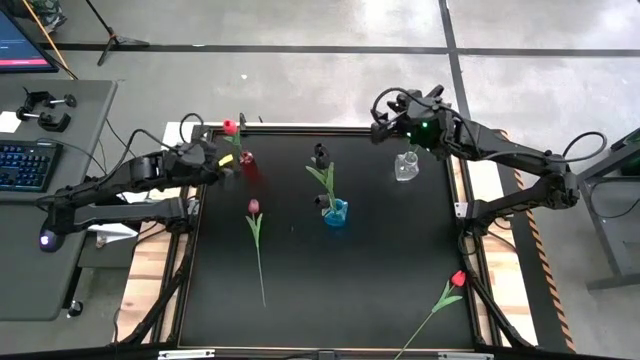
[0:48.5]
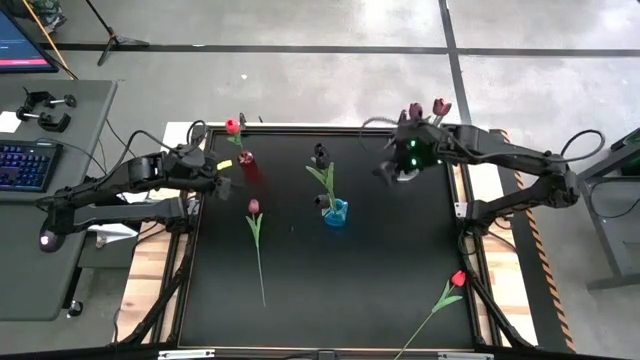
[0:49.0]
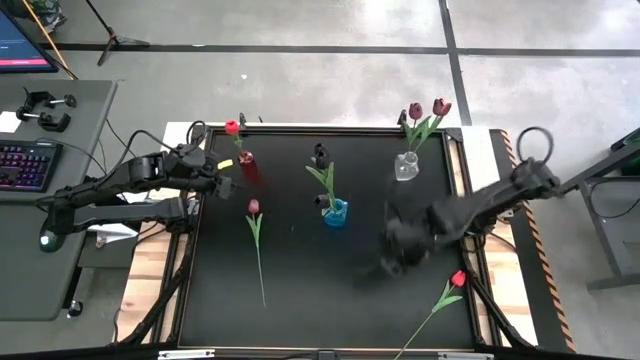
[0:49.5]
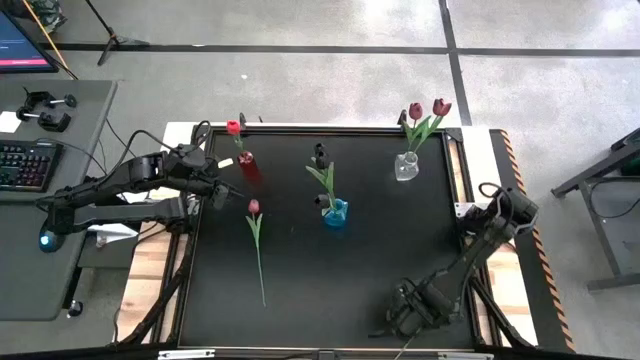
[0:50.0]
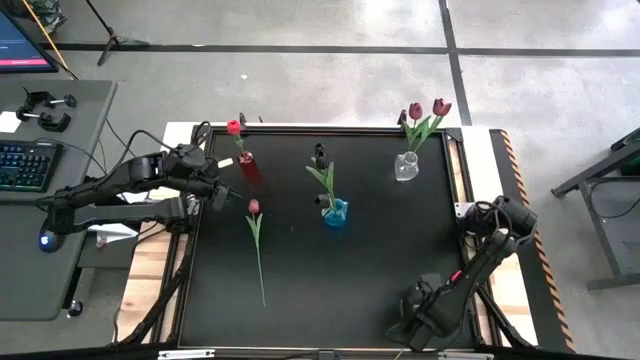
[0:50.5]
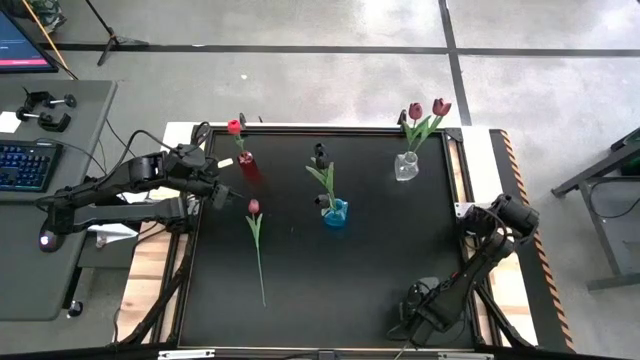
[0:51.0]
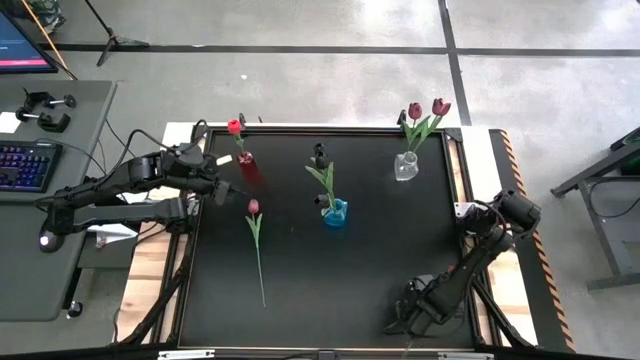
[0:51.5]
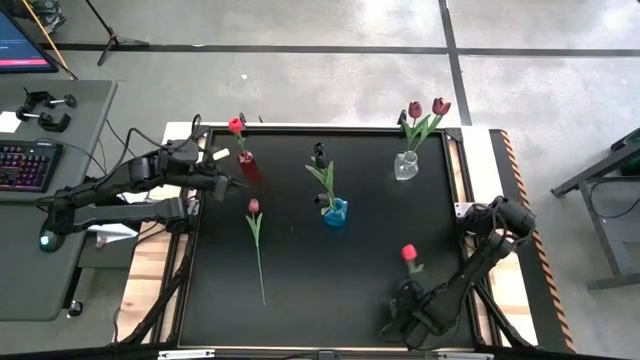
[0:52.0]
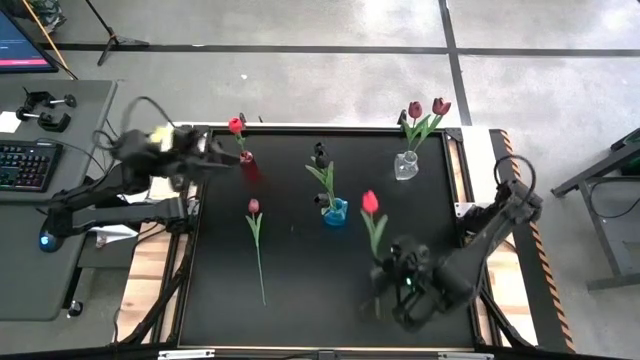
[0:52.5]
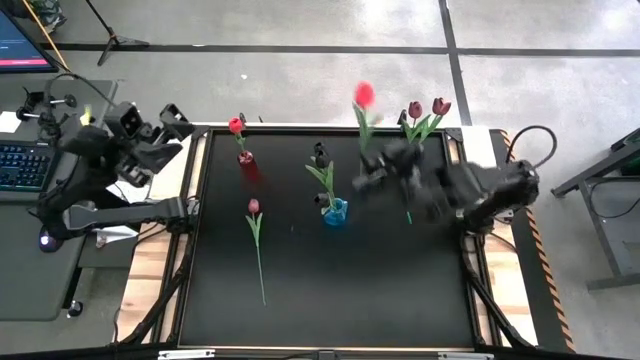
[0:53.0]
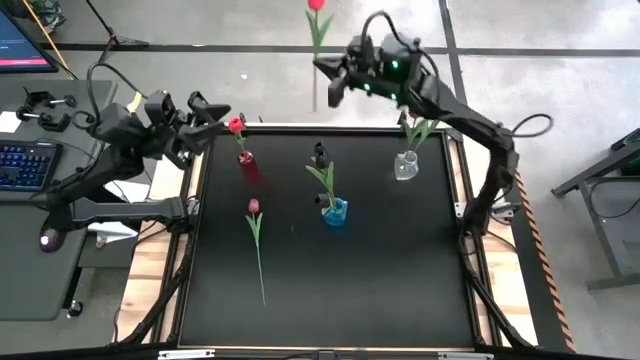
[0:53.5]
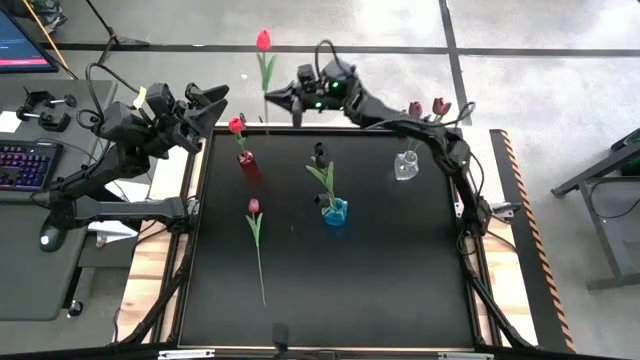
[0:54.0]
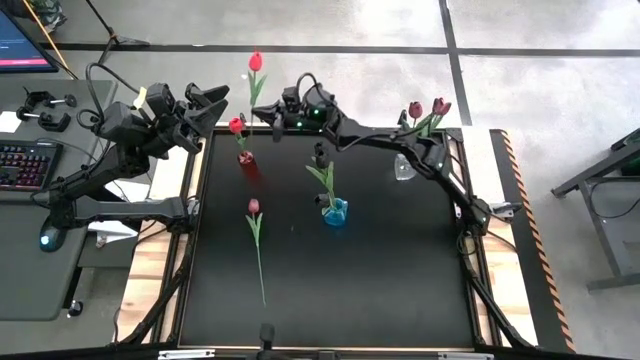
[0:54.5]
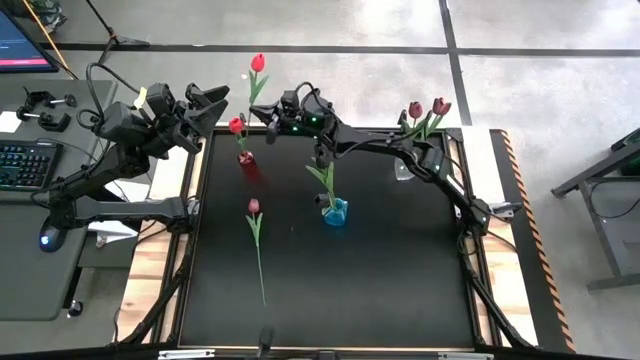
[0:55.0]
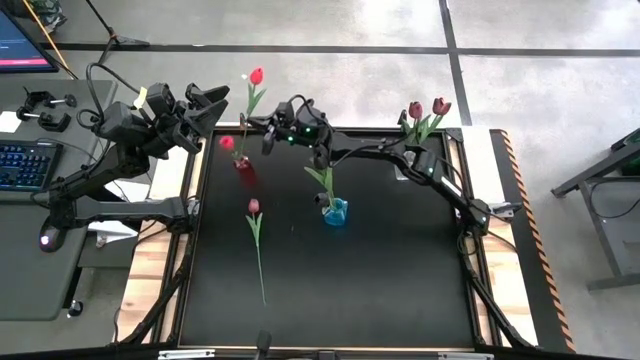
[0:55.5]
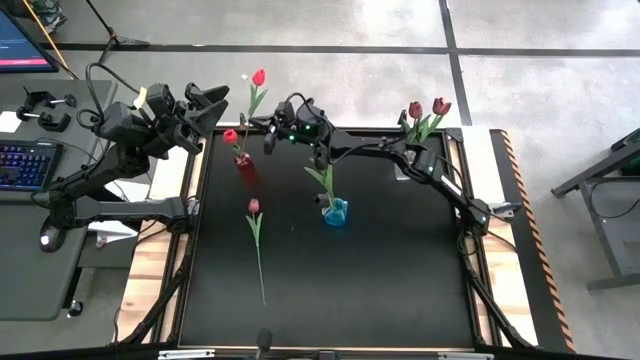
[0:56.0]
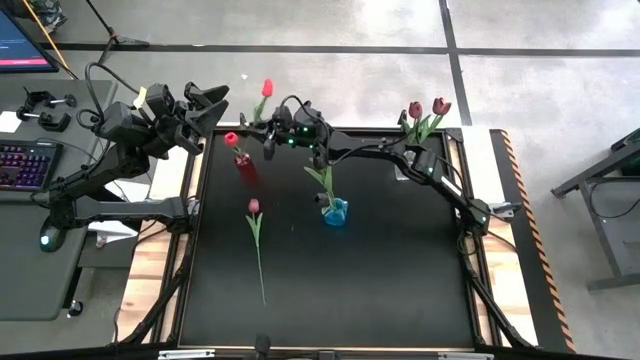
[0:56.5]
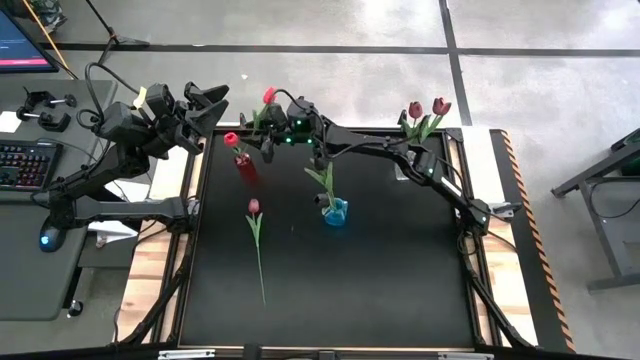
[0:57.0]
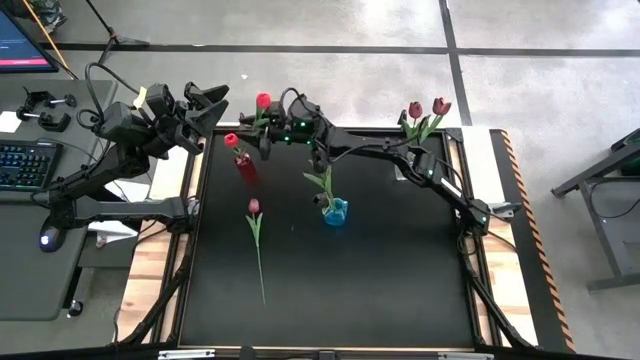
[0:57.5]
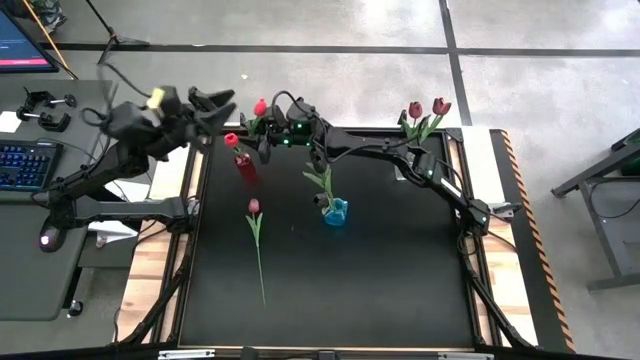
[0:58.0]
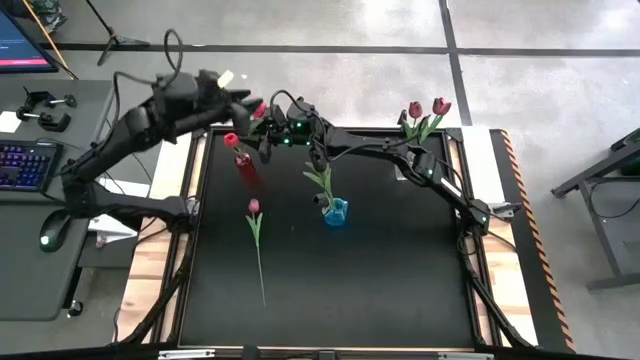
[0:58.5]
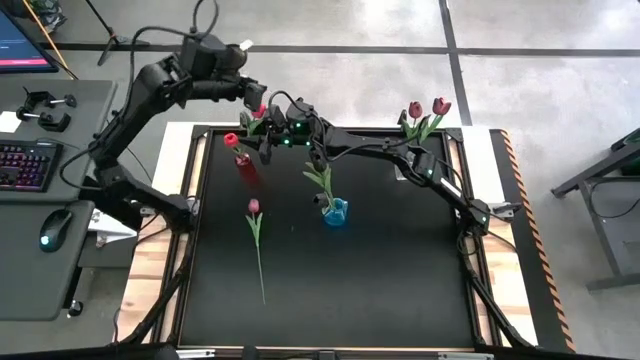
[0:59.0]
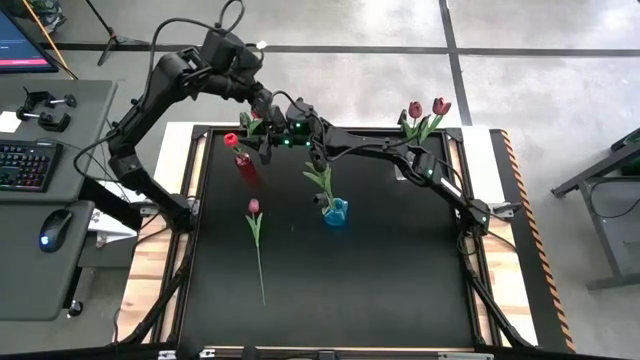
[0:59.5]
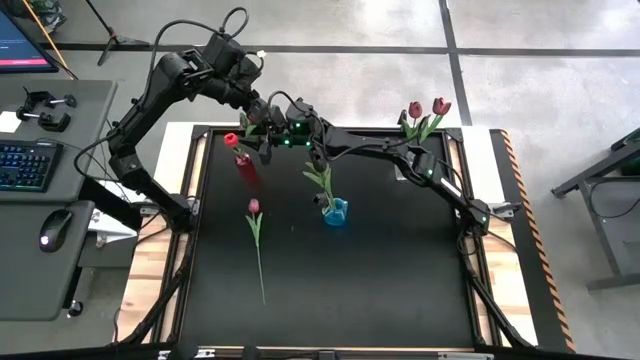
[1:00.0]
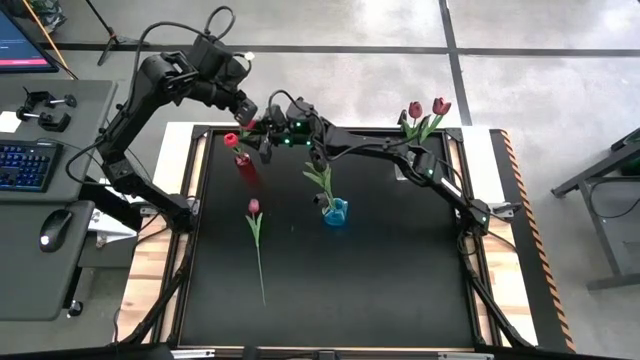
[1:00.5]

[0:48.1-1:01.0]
Task: Sort flowers into vase by color
Put the pink tulip into the red flower vase

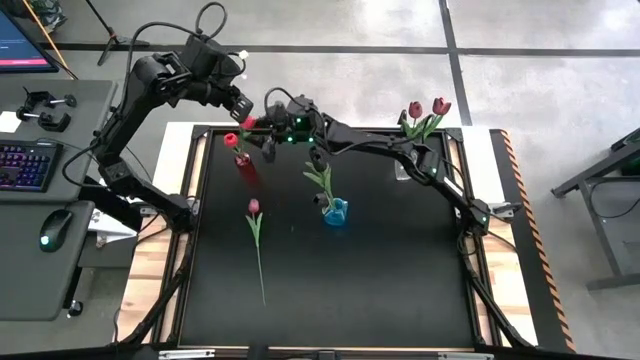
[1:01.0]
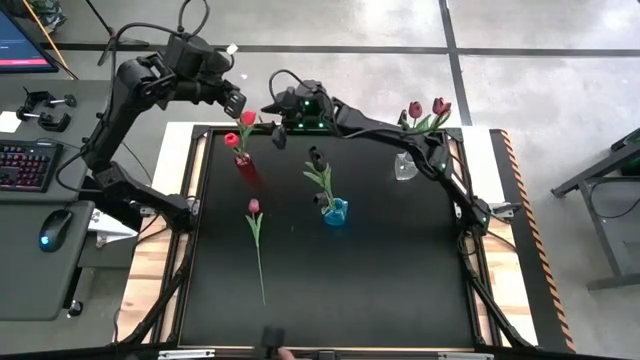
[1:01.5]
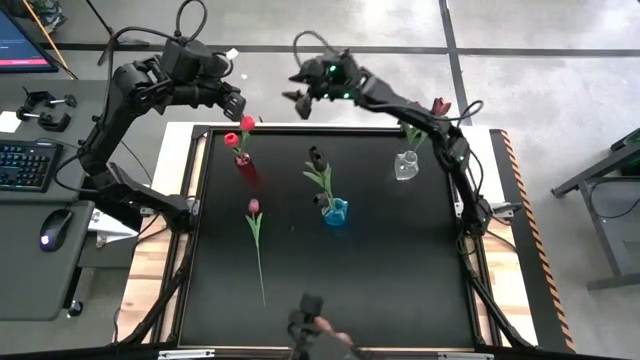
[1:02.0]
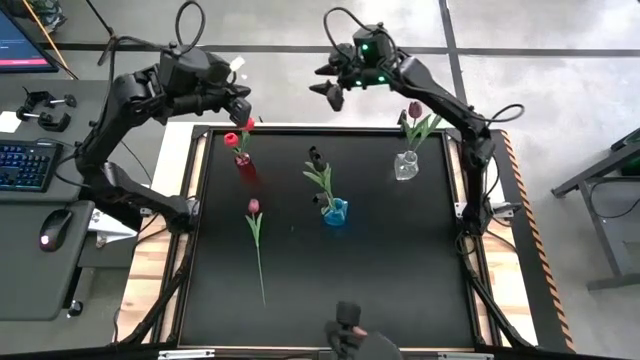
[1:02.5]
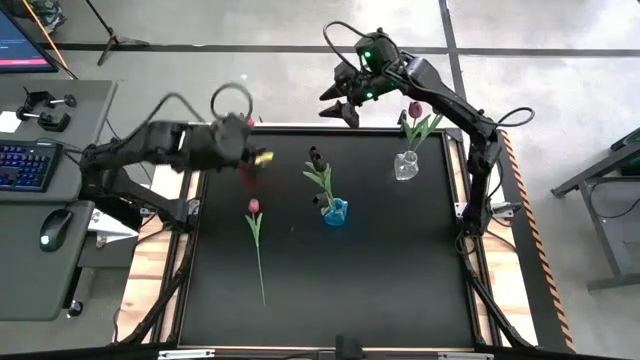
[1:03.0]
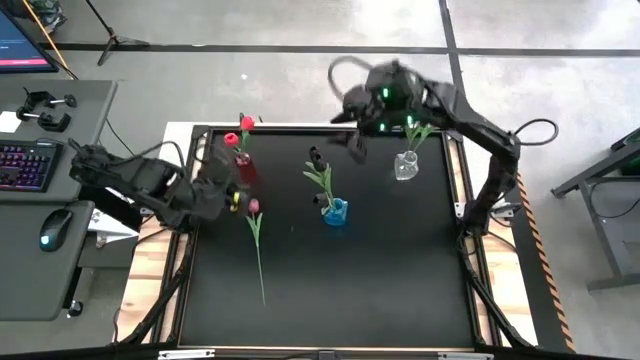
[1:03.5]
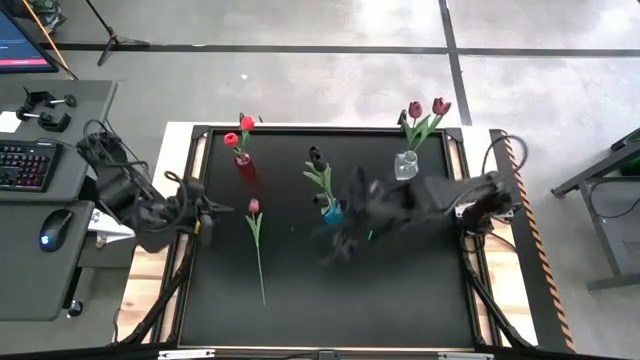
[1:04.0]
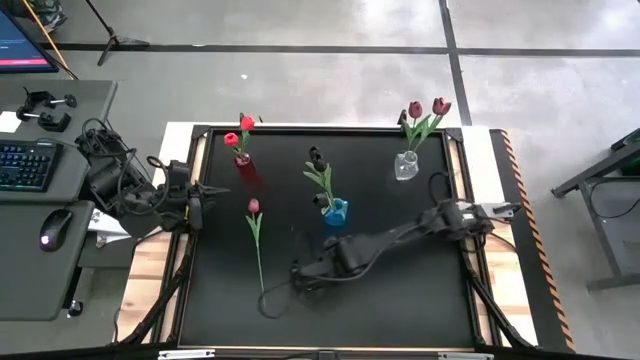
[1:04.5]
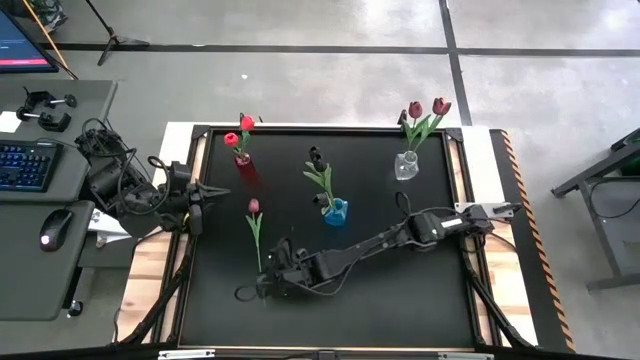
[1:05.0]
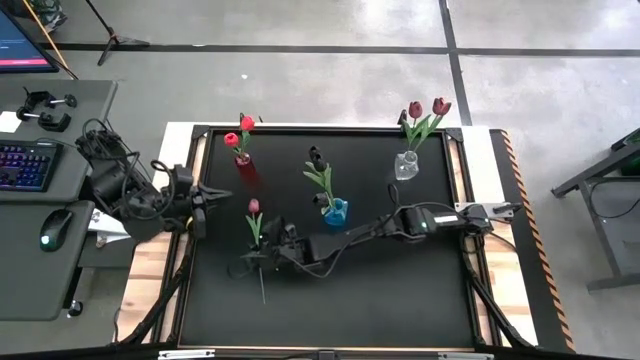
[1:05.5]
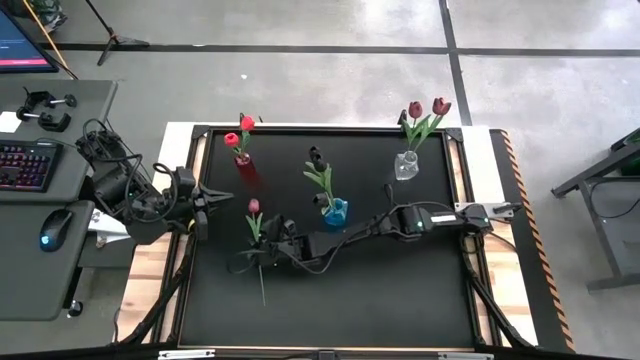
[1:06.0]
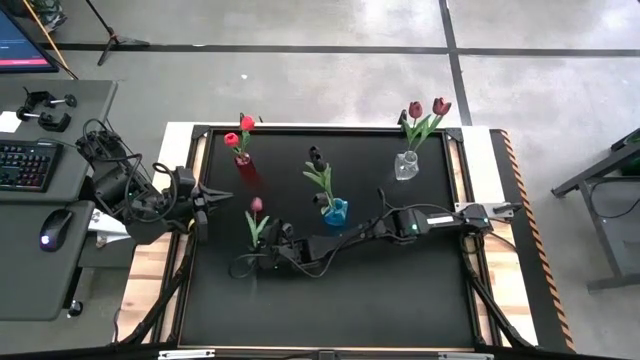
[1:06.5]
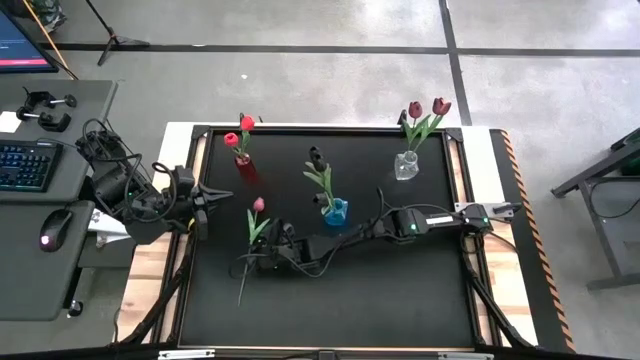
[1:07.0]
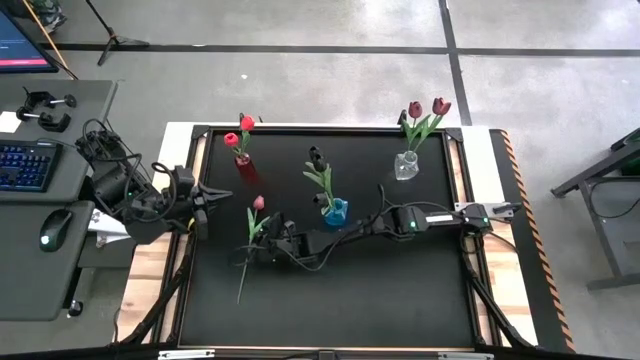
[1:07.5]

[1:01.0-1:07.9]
Put the red tulip into the transparent flower vase

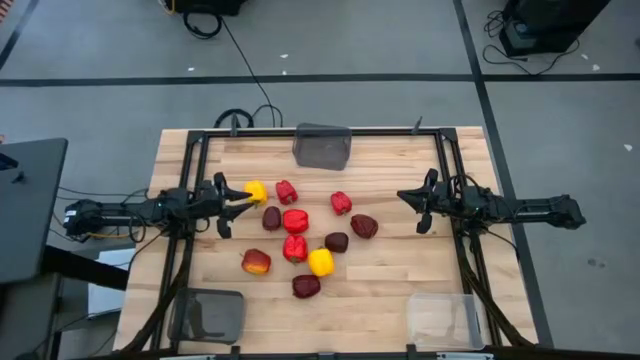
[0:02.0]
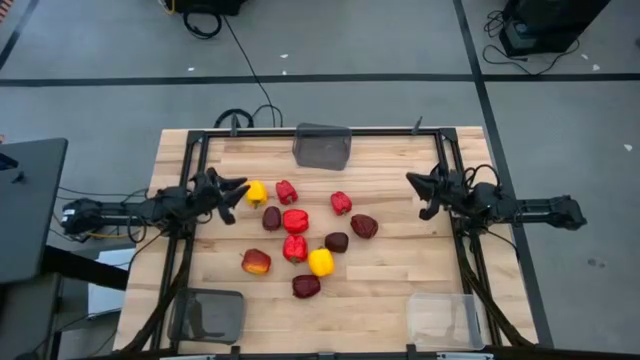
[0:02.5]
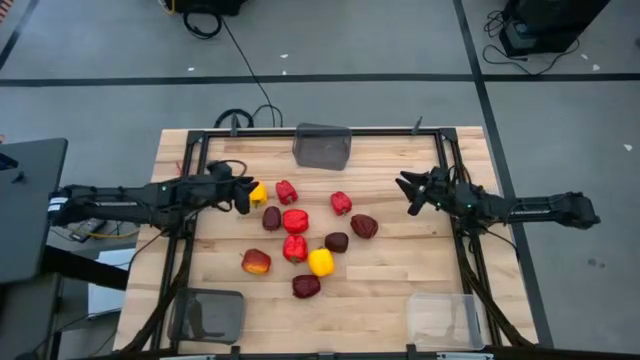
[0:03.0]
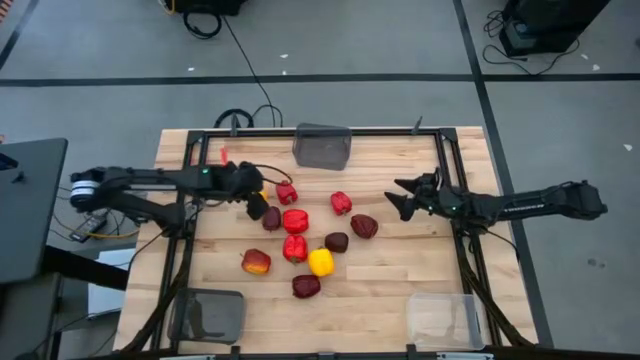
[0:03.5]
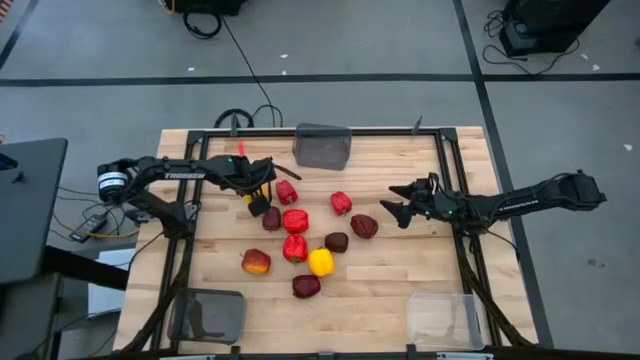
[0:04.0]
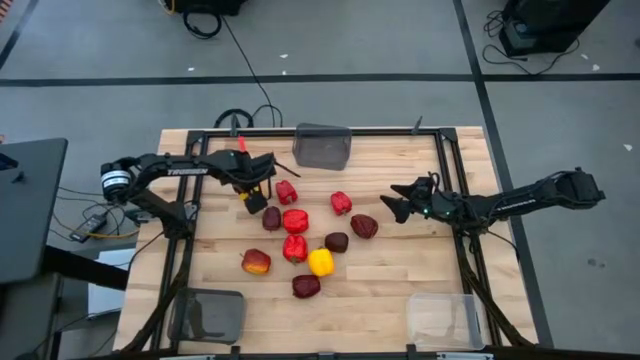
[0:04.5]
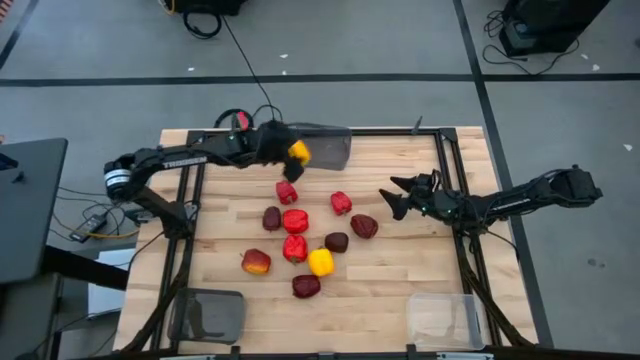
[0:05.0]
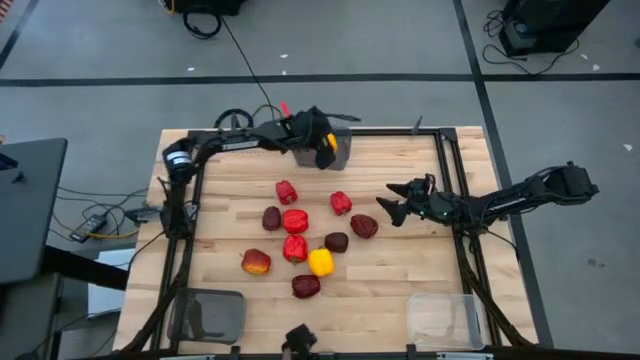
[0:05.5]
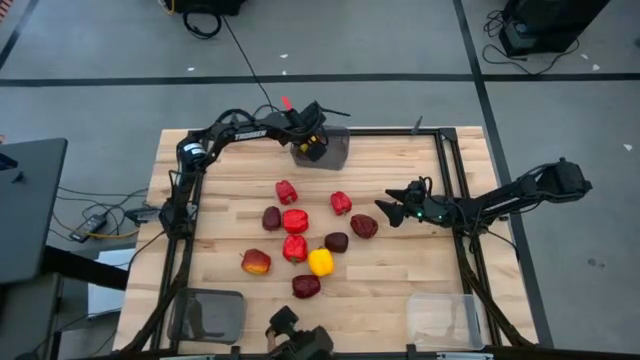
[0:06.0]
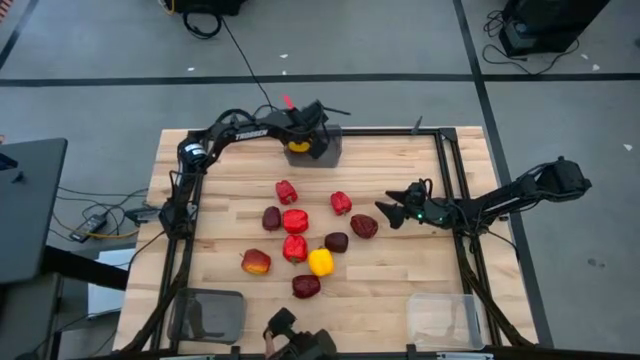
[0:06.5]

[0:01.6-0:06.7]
Task: Sort produce into baskets
Put the yellow bell pepper into the top black bin
